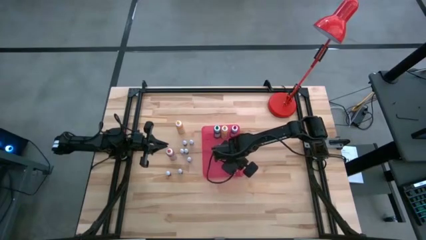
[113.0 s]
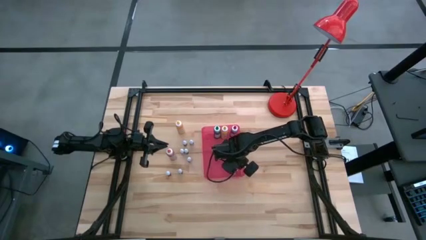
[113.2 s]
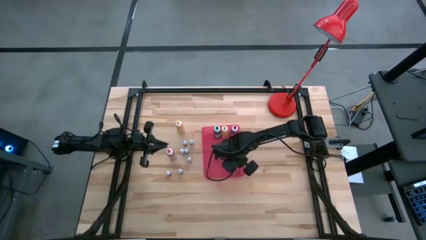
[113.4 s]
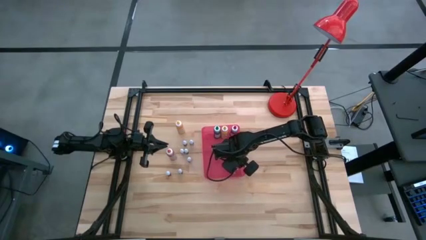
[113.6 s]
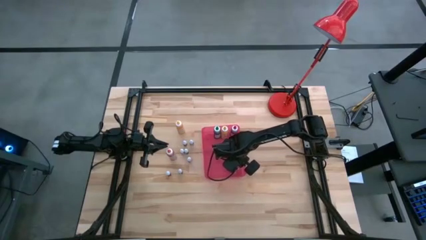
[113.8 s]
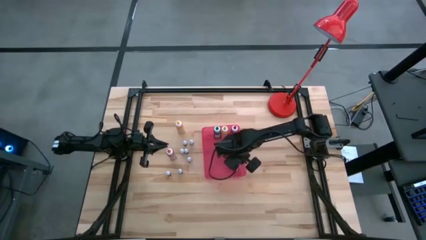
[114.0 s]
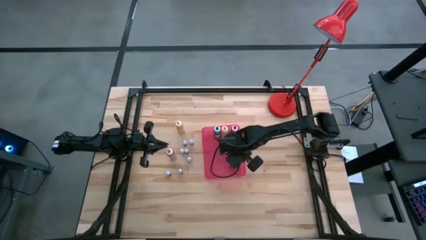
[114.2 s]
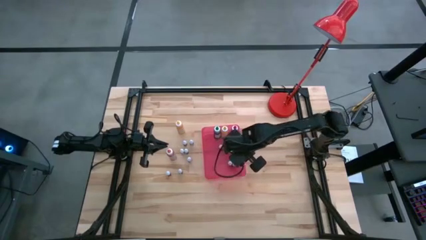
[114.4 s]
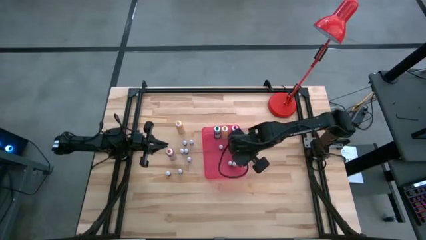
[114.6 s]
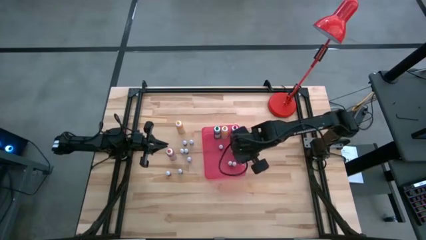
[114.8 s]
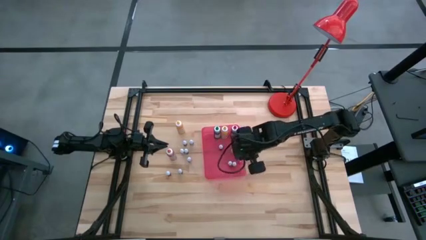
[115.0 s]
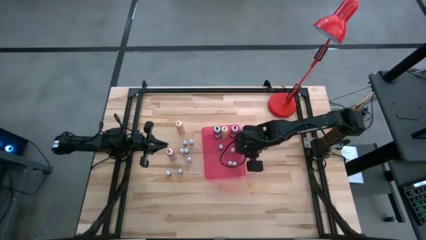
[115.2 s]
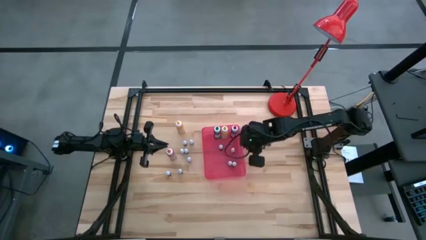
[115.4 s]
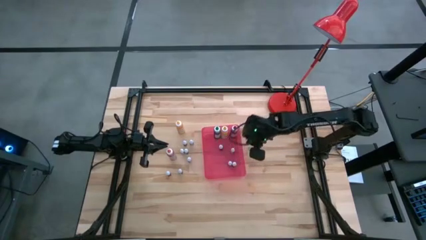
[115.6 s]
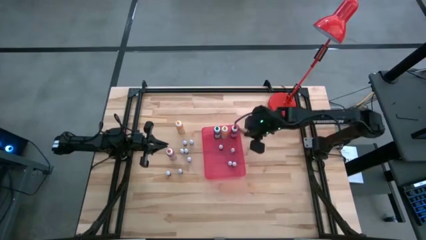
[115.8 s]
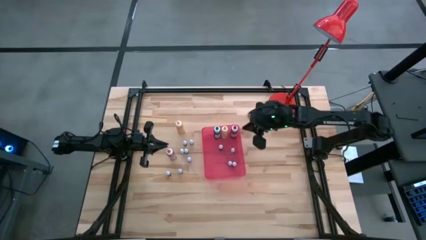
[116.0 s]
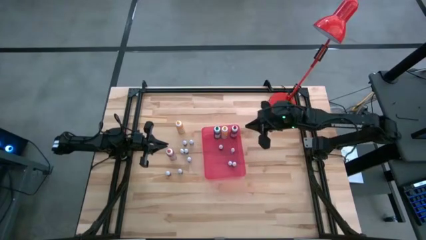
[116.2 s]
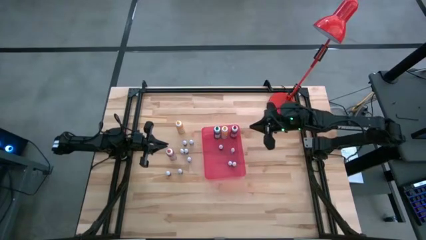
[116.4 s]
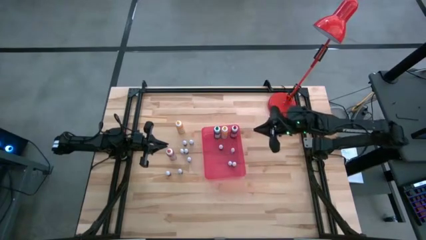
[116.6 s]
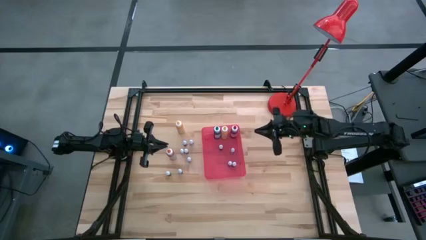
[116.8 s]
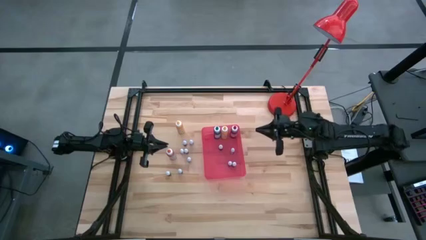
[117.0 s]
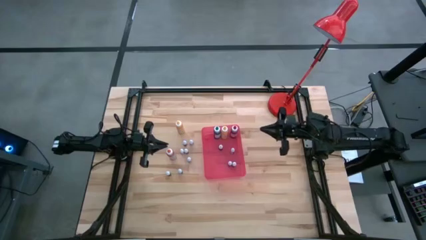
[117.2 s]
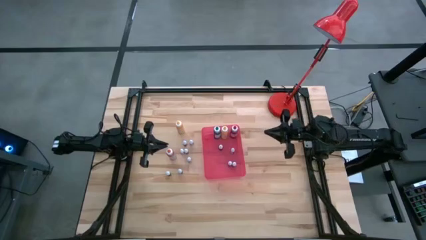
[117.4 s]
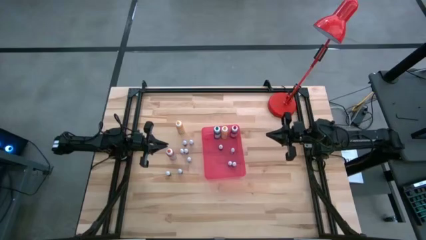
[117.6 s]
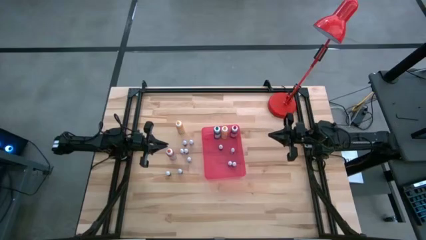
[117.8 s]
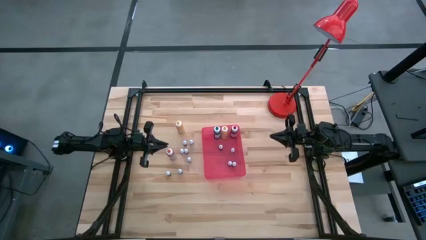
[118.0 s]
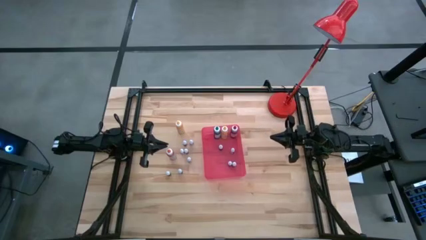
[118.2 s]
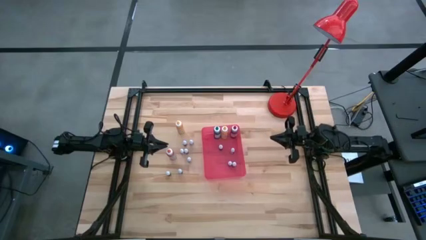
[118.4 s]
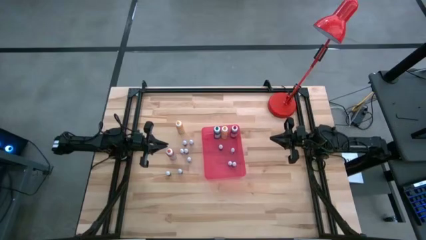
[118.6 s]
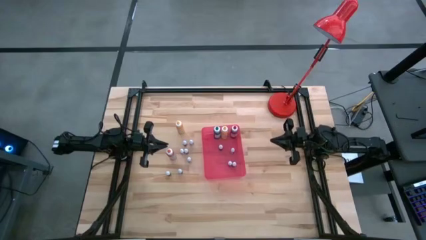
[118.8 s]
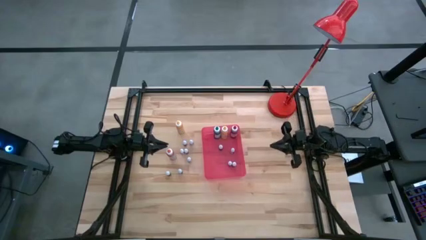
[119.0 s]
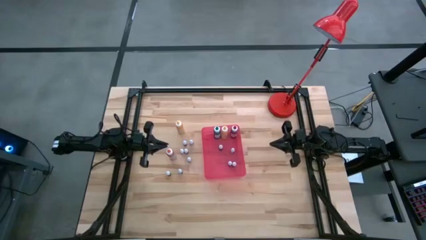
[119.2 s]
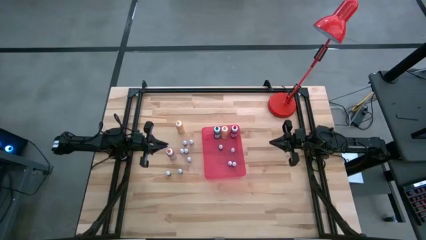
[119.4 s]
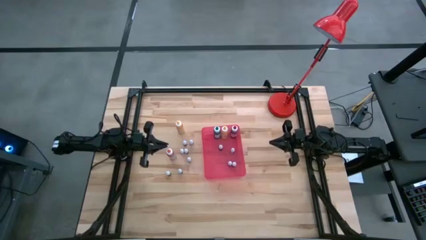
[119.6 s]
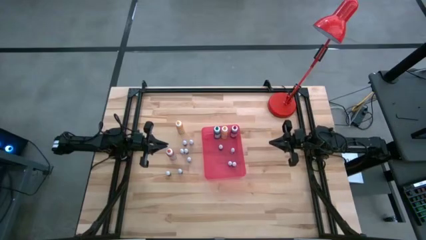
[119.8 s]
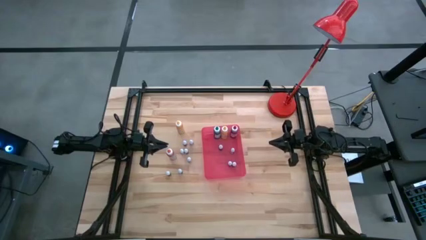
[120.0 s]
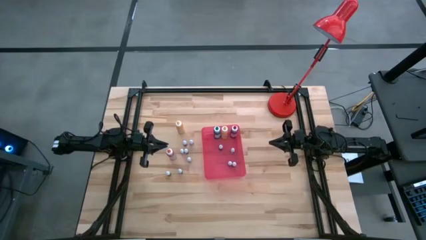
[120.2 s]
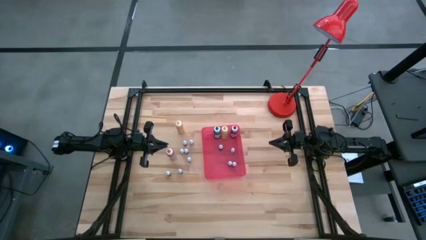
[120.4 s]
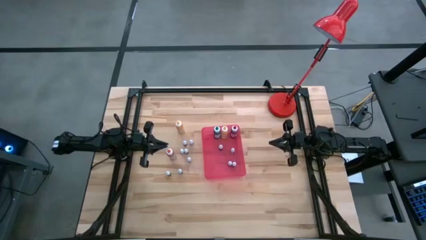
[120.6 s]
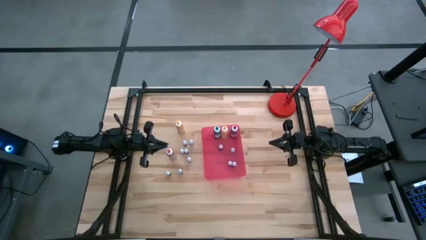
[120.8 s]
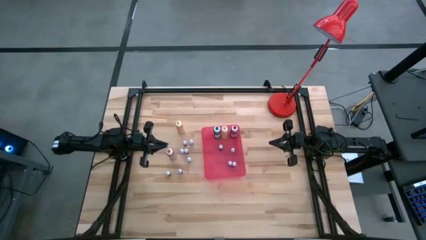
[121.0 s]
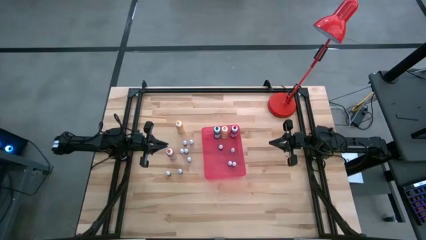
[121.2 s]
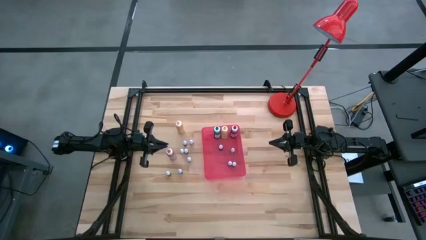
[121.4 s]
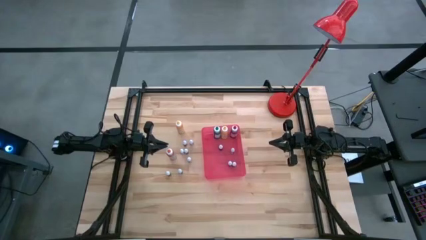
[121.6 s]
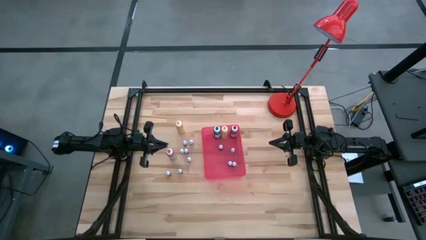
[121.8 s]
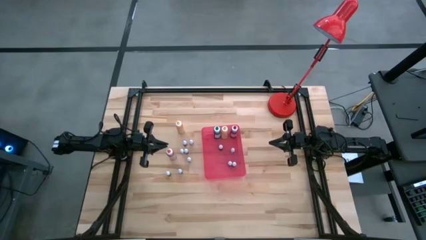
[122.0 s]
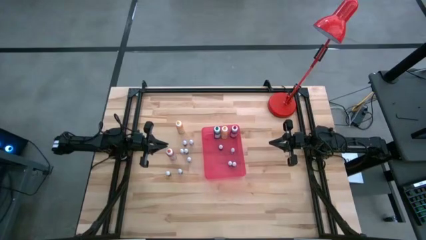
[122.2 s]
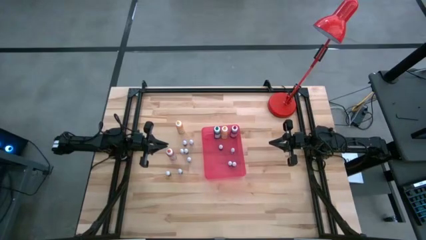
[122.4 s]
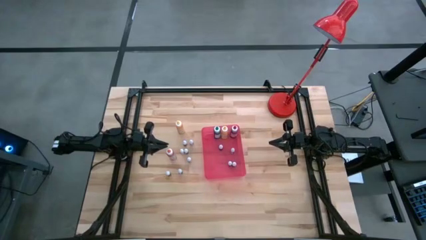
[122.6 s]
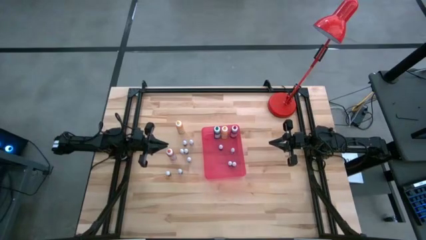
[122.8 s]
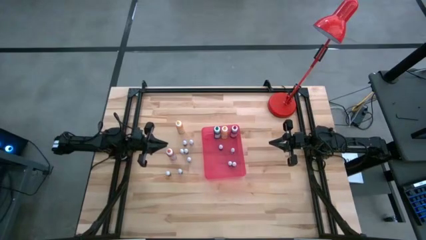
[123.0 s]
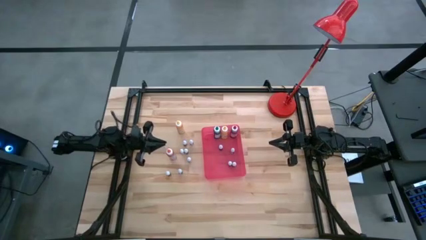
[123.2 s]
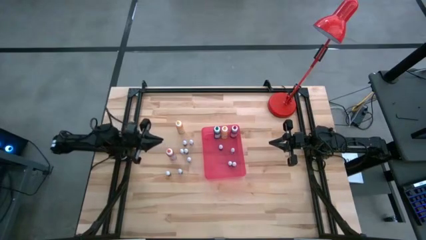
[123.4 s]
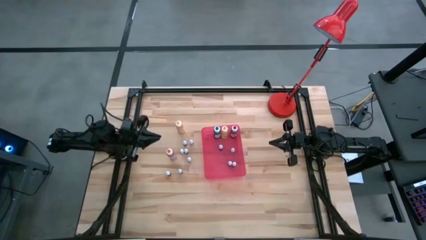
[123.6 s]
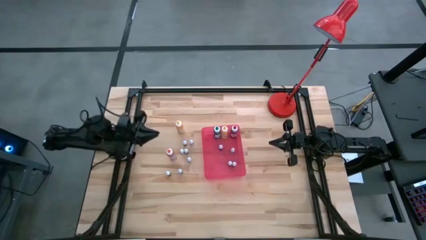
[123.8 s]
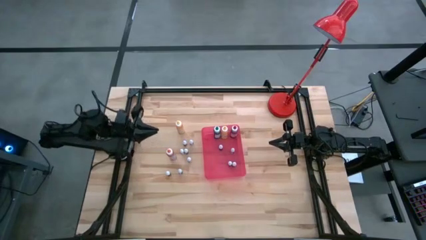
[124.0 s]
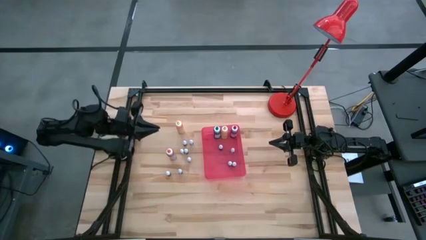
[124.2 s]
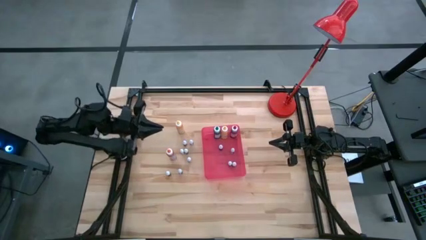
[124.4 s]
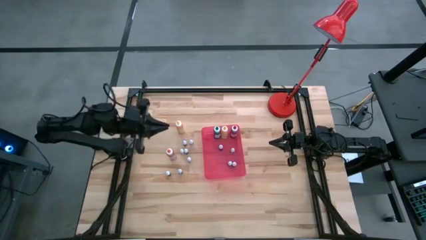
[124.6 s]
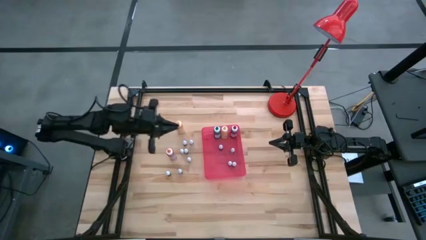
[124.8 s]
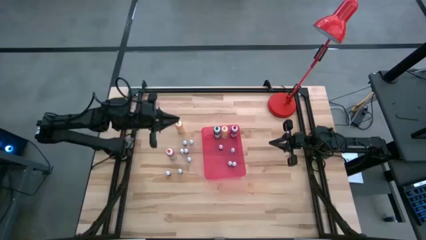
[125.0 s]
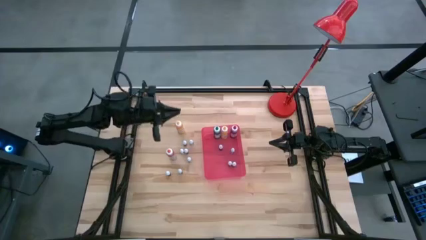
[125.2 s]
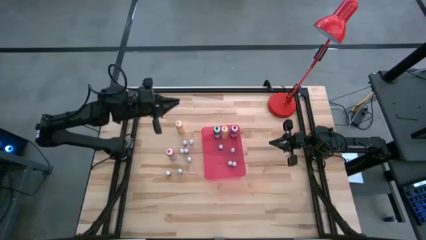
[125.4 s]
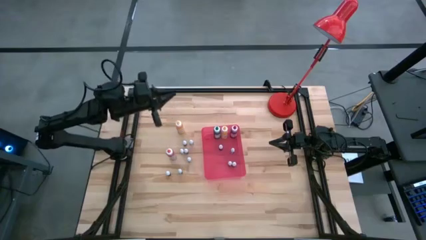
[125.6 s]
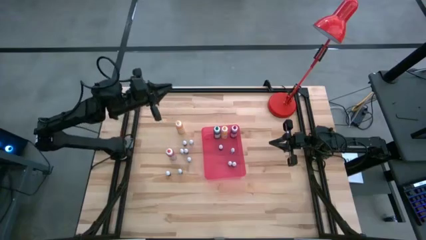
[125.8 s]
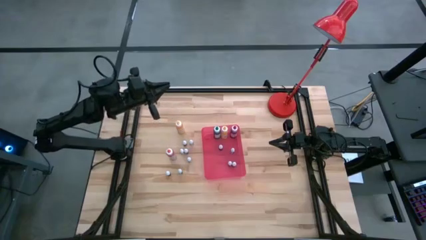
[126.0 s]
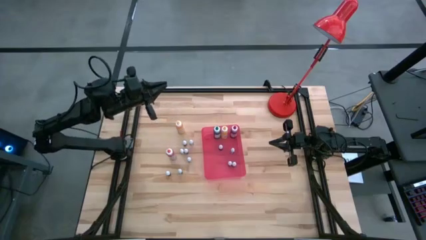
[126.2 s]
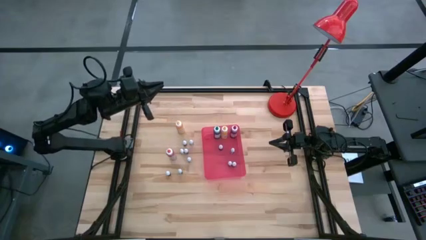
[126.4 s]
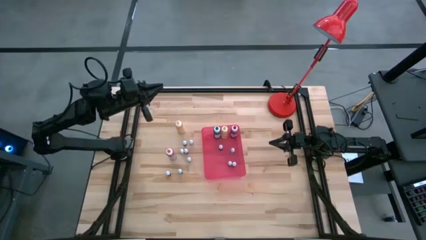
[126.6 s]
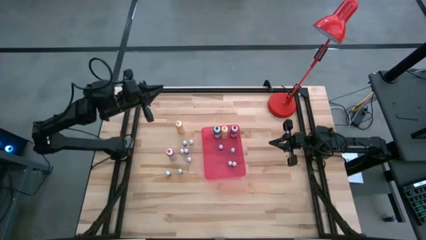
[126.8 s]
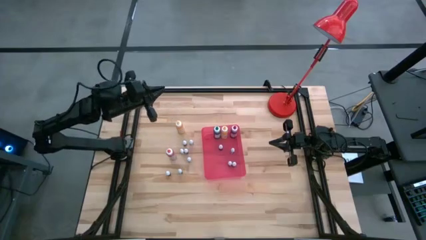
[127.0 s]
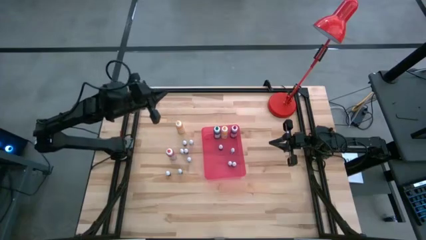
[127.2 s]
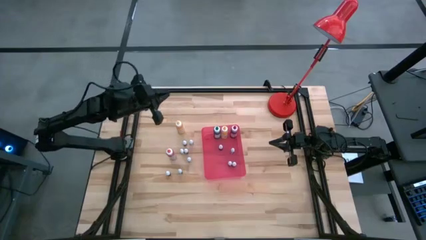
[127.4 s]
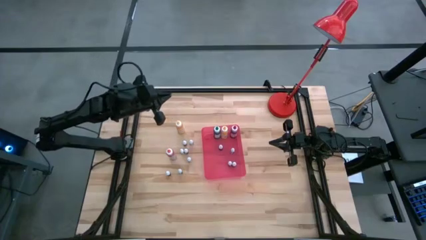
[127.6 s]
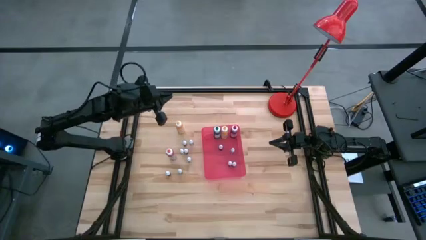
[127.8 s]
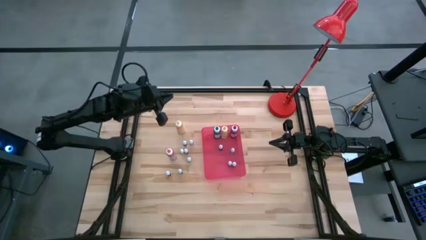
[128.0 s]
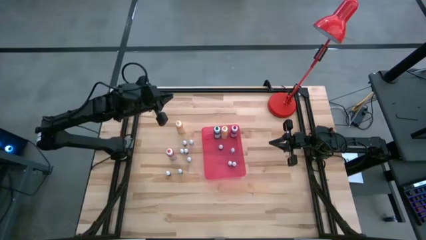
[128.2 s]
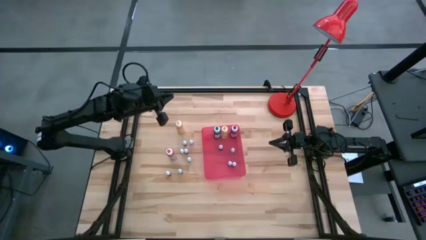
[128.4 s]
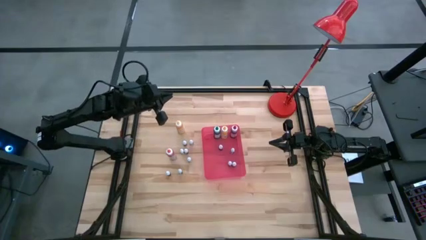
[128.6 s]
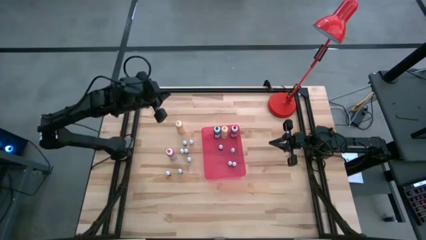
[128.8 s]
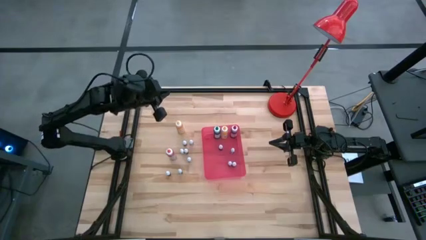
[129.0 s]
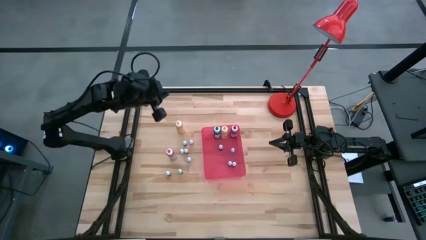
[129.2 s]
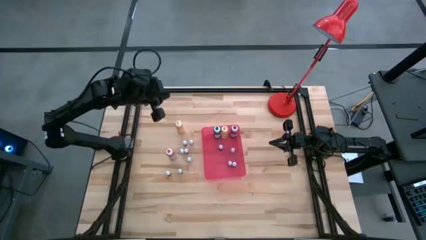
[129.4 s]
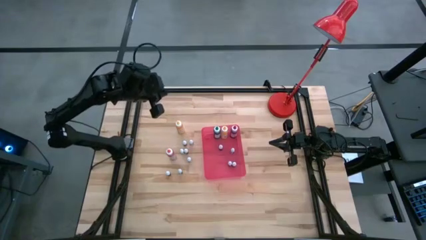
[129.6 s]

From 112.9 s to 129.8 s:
Task: Pick & Place food coloring
Put the large yellow food coloring bottle into the red bin

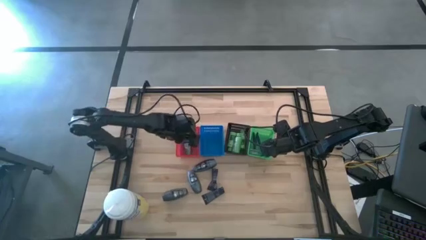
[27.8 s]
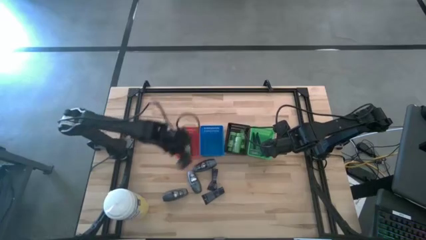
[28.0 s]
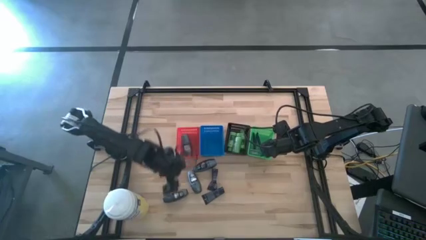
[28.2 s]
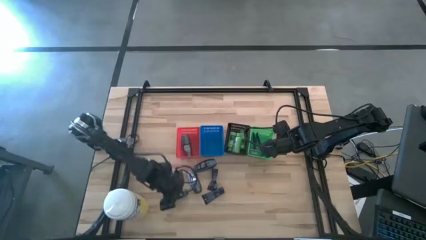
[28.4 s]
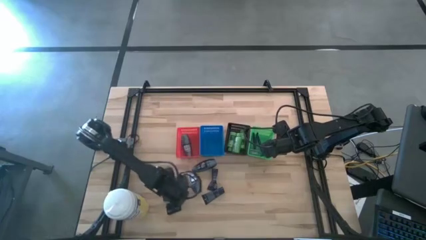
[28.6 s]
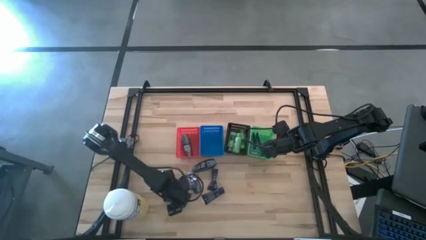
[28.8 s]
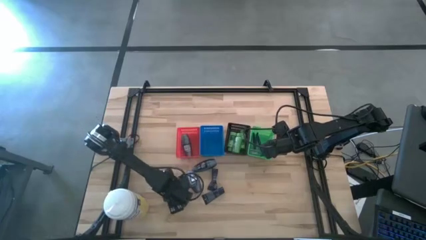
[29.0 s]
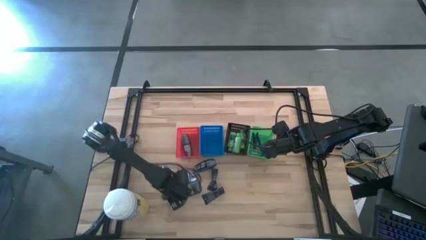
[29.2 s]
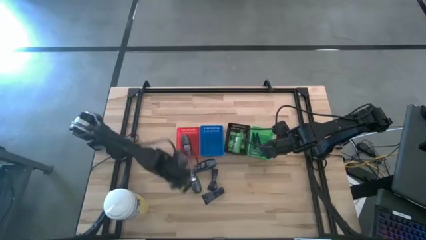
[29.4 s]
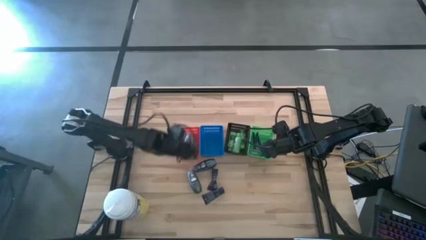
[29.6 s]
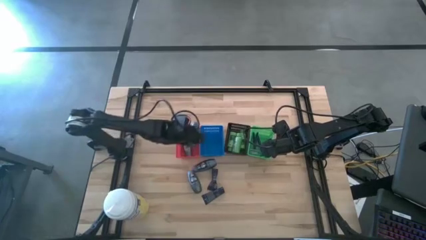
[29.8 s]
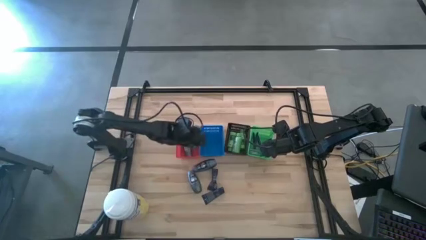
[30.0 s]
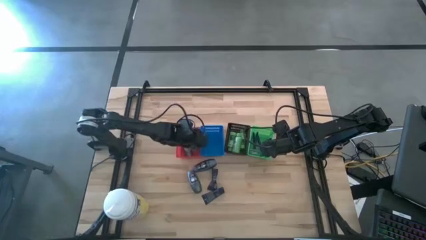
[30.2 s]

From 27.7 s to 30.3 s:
Task: Pick & Place Travel size toiletries
Put the deodorant into the red bin
